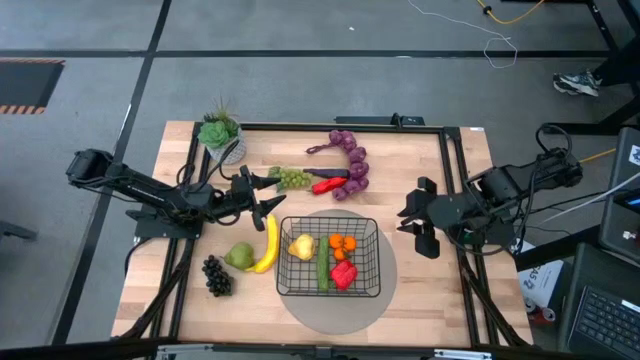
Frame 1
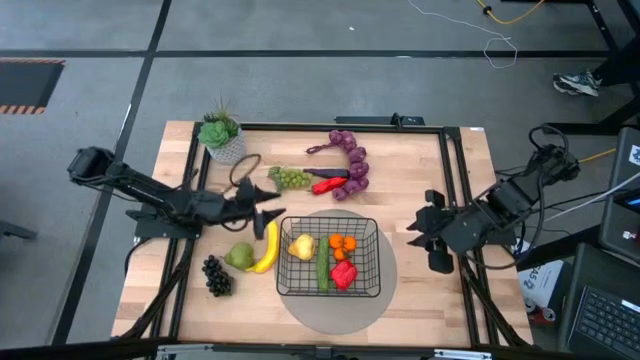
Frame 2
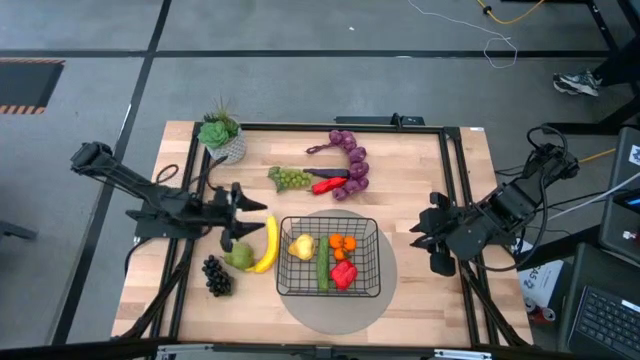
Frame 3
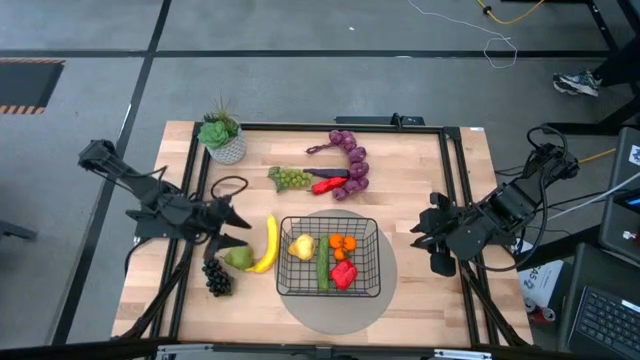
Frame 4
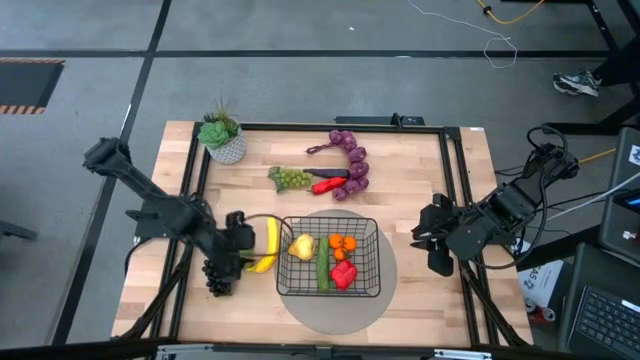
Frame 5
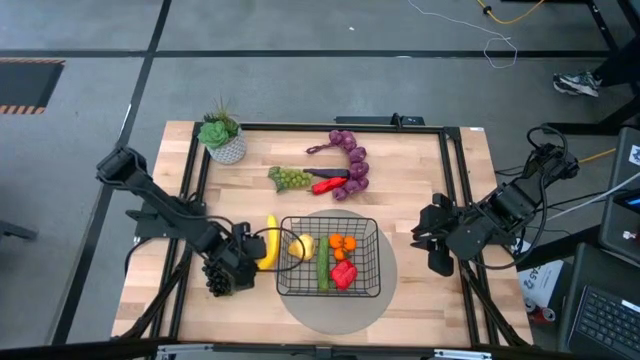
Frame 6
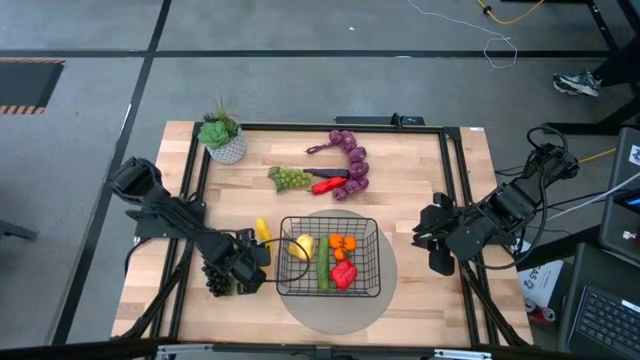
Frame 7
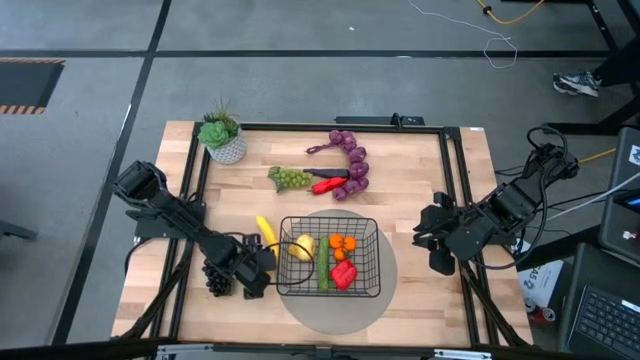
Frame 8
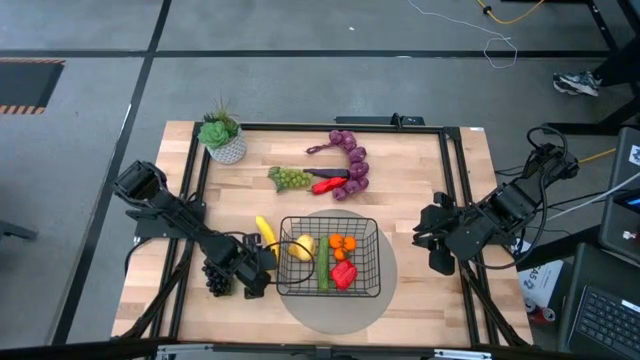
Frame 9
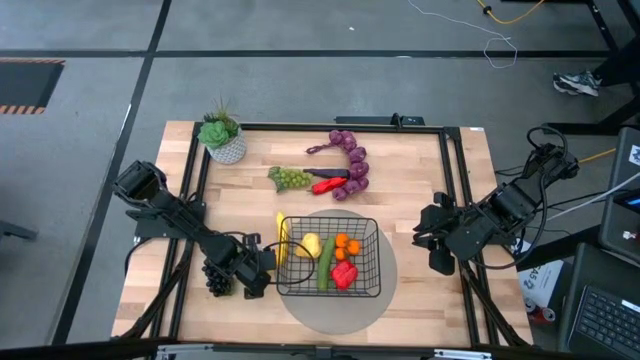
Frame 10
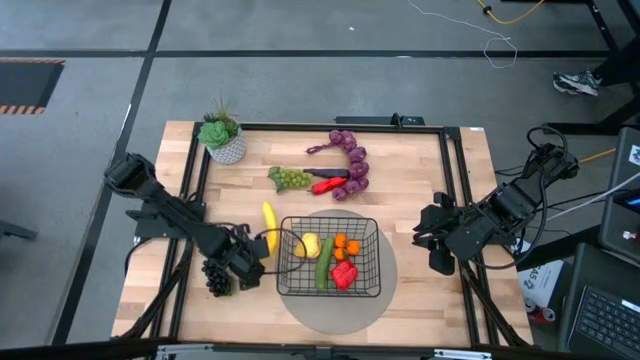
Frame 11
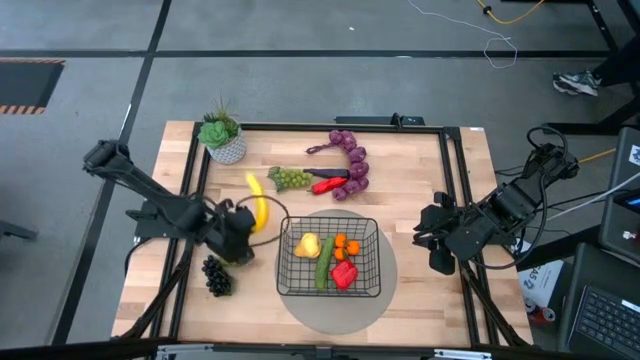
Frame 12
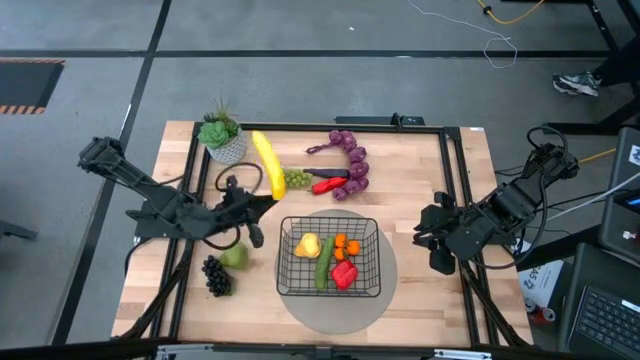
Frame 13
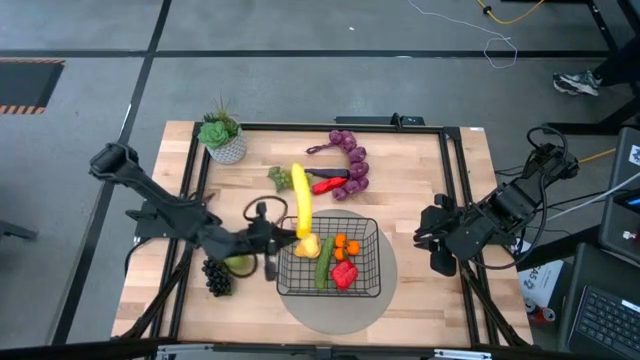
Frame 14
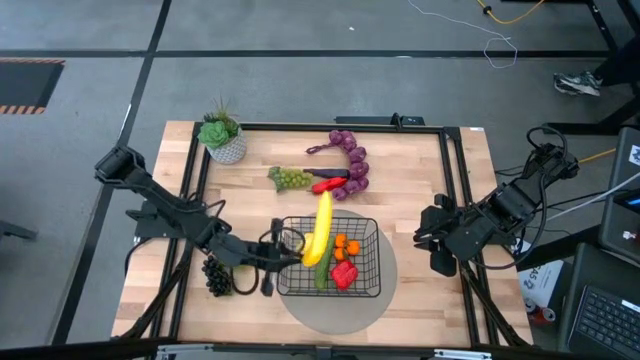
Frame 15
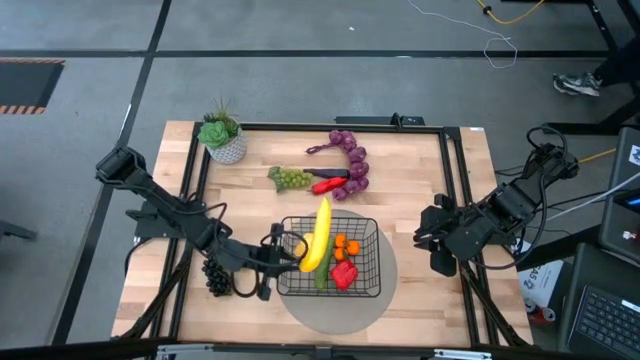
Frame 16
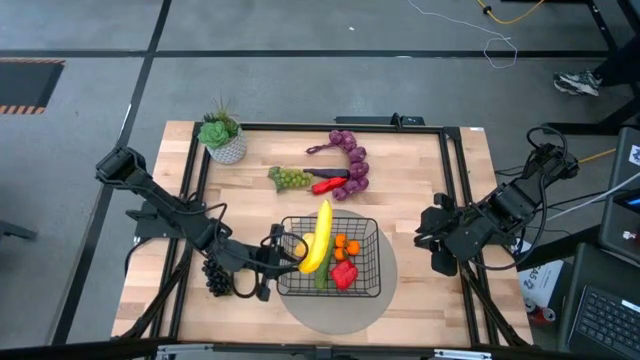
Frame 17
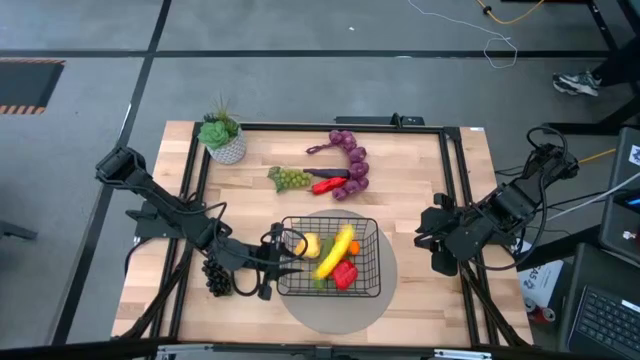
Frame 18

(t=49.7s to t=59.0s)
Task: Build produce basket
Put the yellow banana into the wire basket

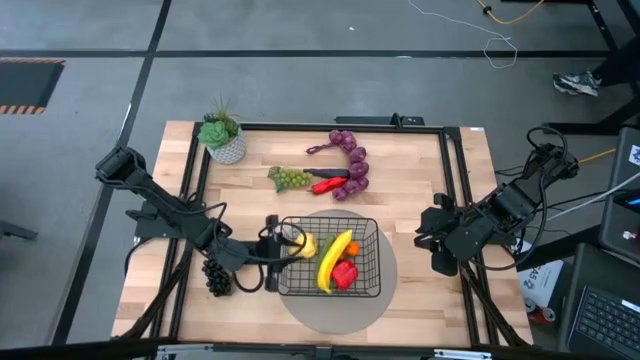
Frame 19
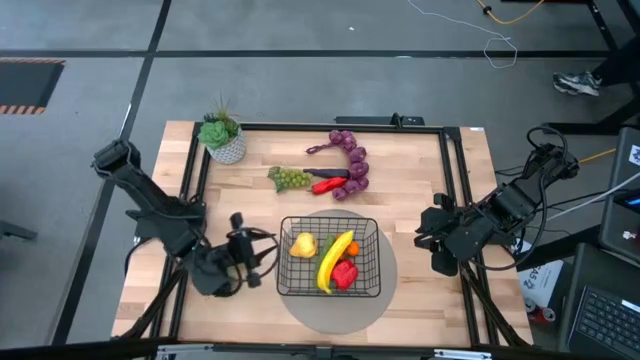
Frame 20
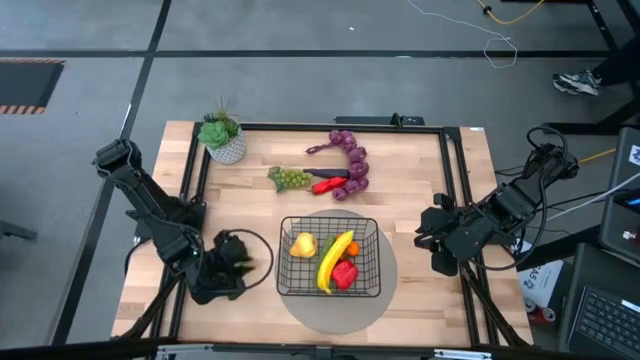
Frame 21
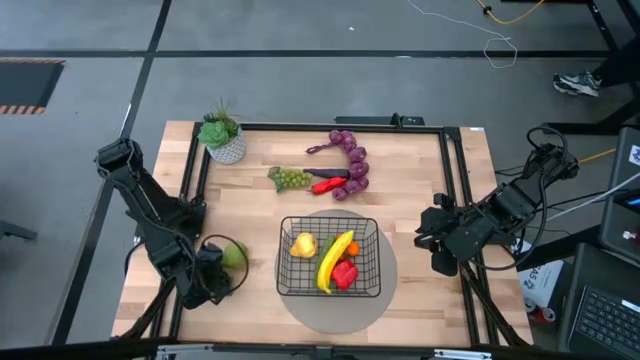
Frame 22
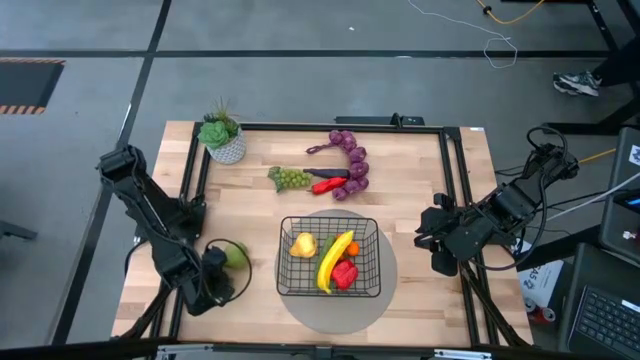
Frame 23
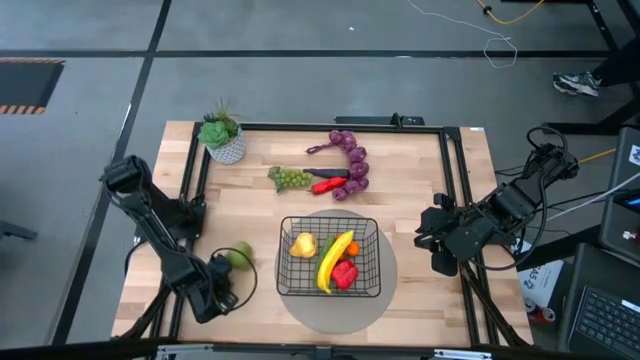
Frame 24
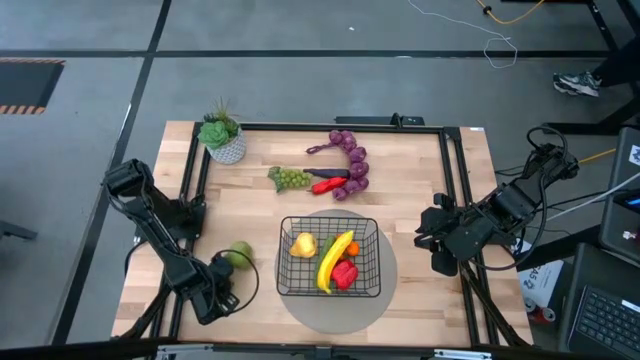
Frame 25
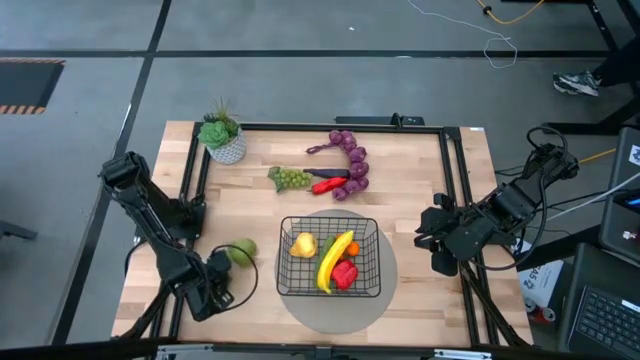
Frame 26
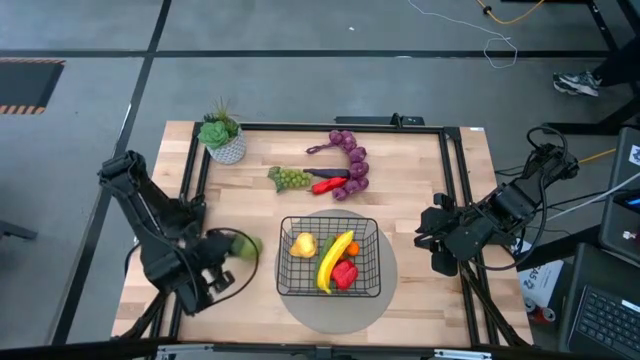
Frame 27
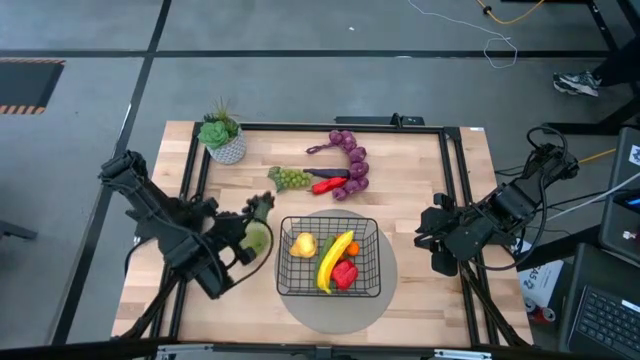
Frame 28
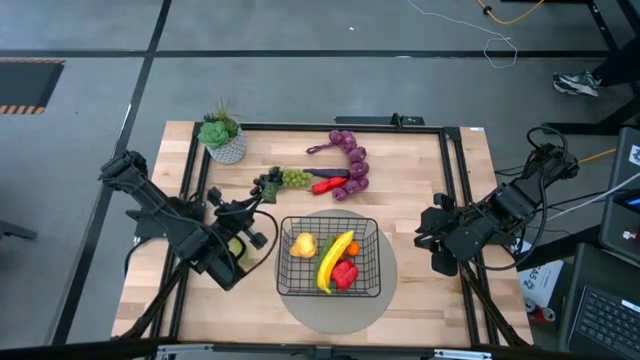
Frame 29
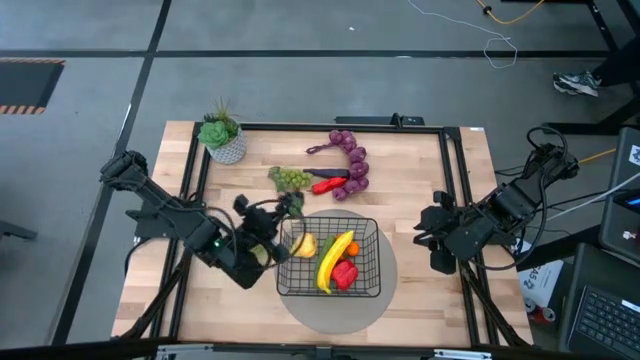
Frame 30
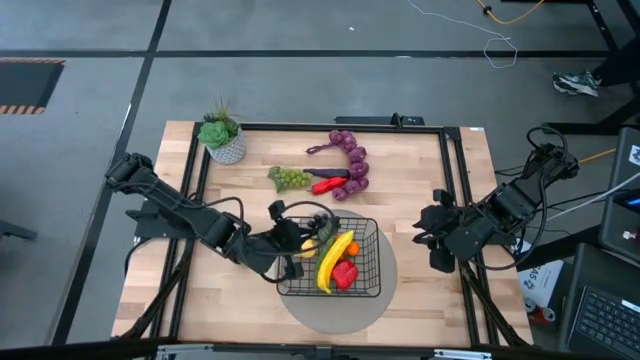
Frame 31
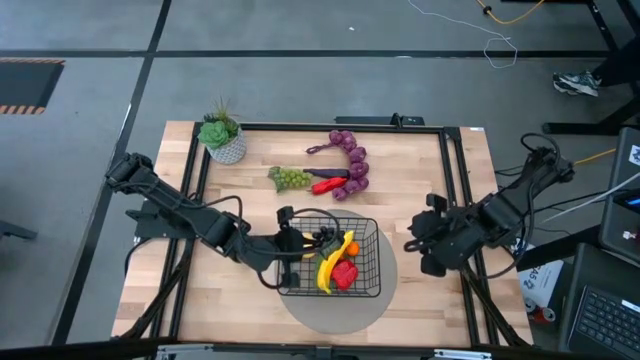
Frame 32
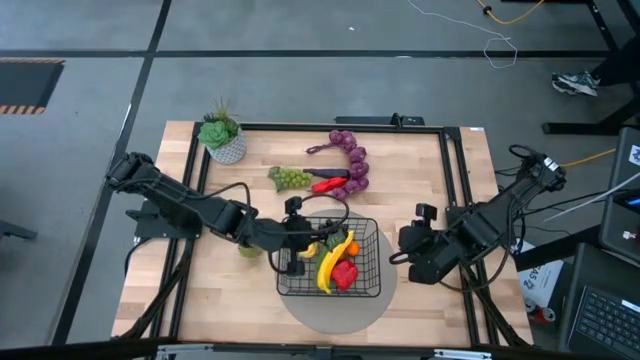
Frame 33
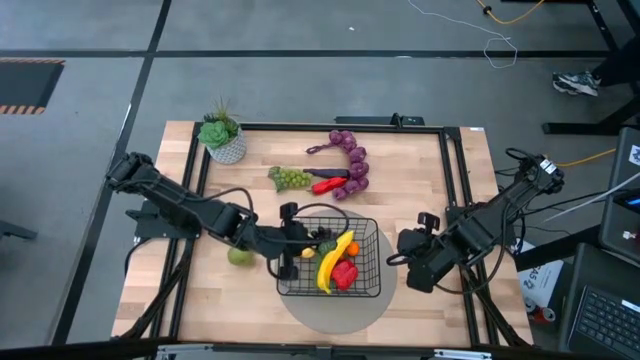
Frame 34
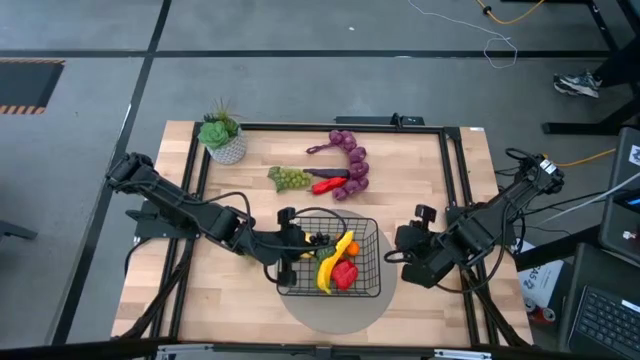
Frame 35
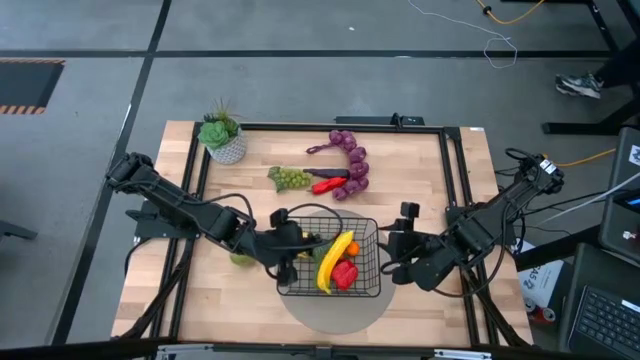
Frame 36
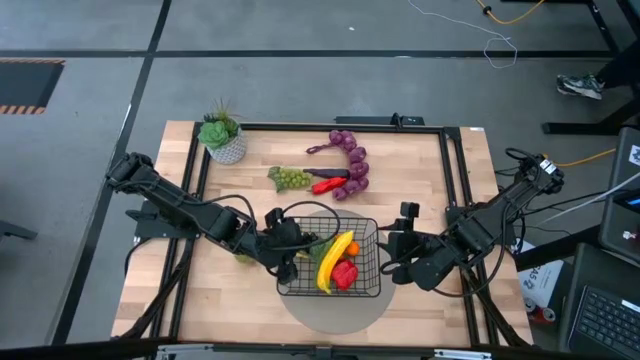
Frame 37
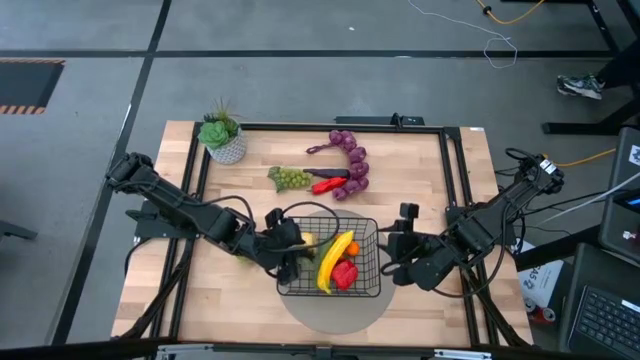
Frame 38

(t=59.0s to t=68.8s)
Put the black grapes into the wire basket

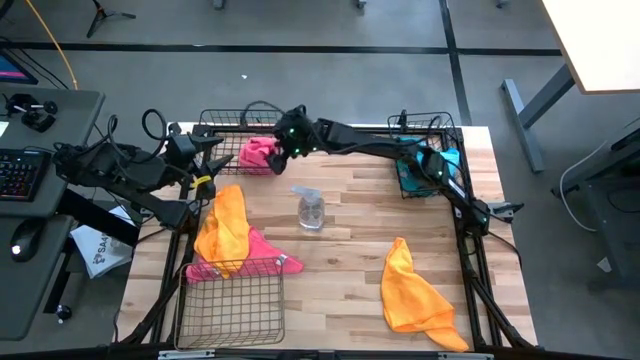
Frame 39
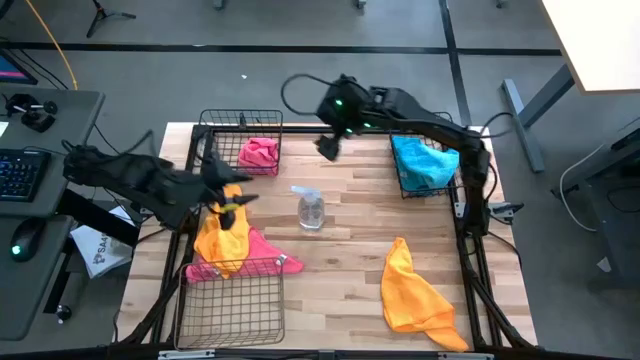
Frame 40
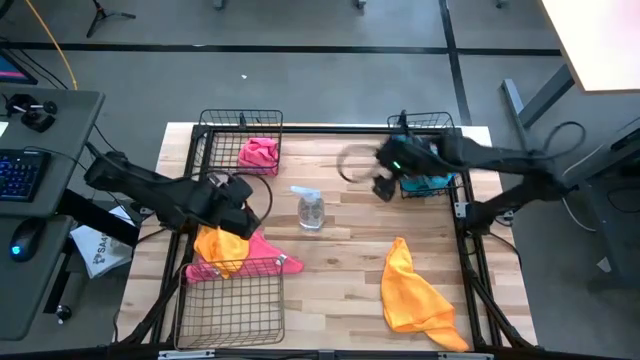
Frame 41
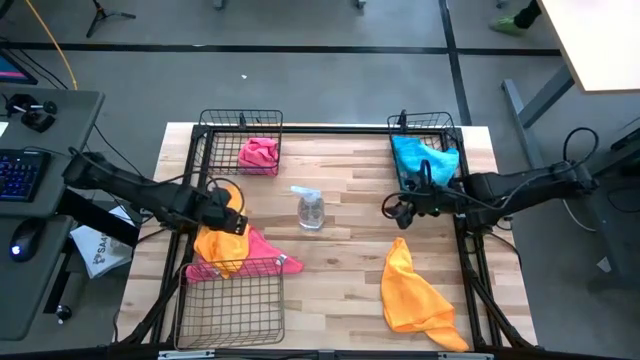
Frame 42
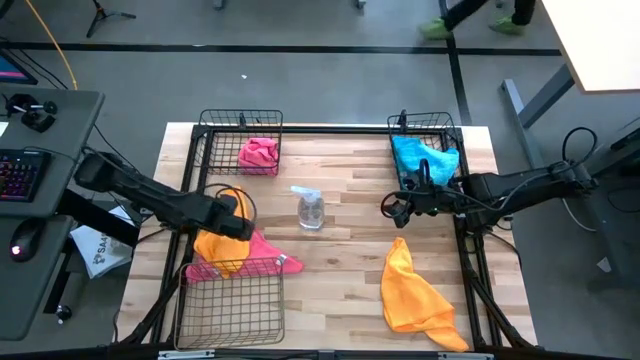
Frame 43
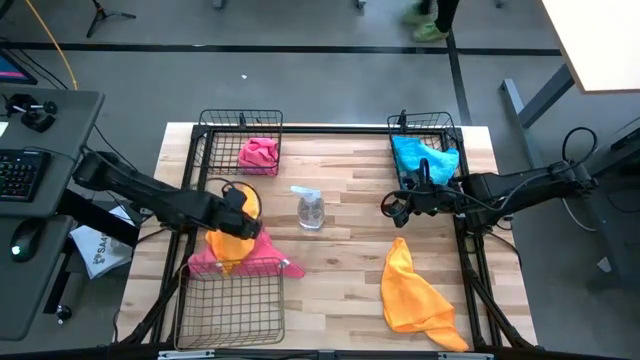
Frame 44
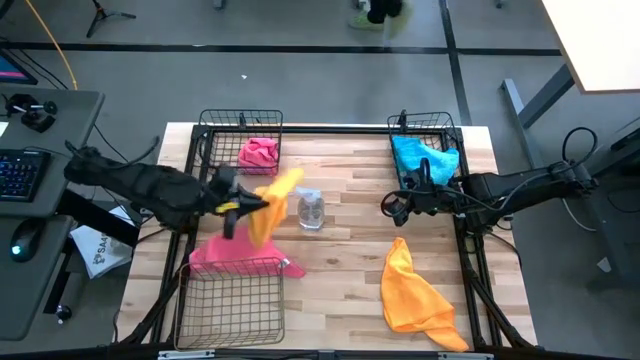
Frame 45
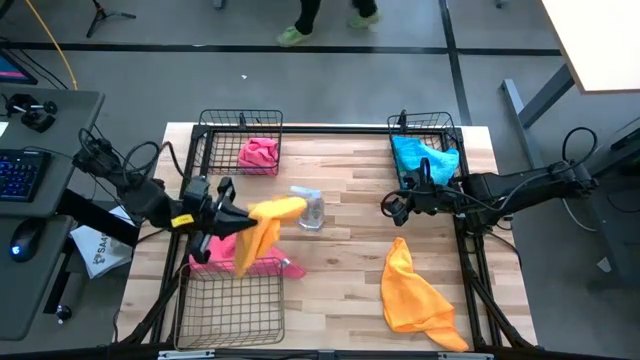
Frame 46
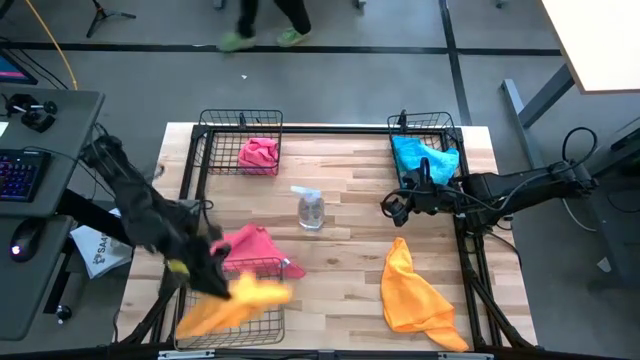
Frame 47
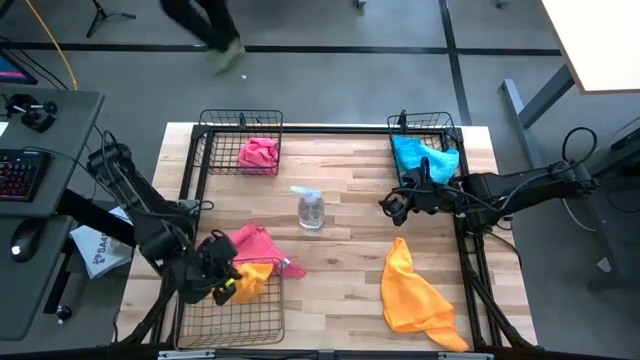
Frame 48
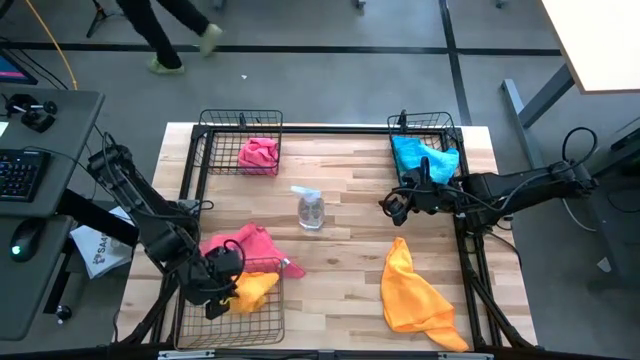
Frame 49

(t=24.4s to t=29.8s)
Task: Sort microfiber towel by color & place in baskets
Put the left yellow microfiber towel into the gold wire basket
